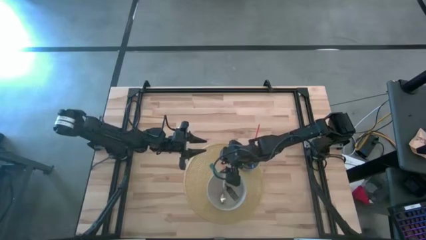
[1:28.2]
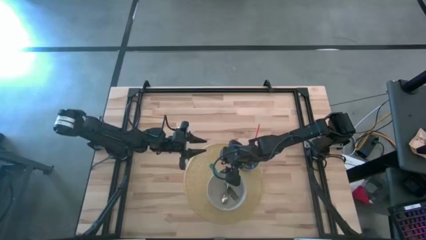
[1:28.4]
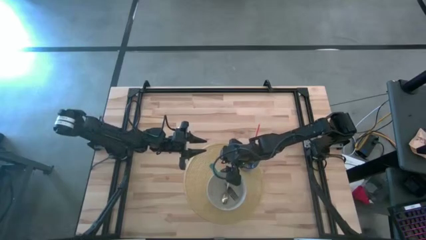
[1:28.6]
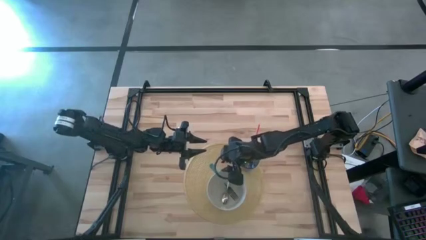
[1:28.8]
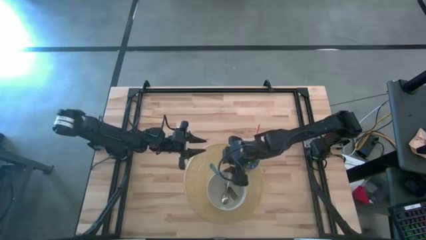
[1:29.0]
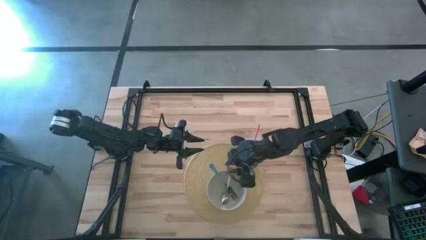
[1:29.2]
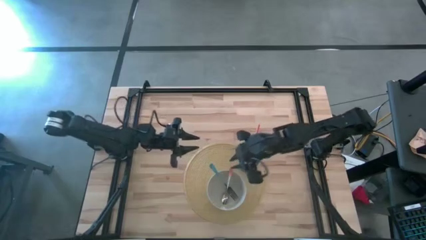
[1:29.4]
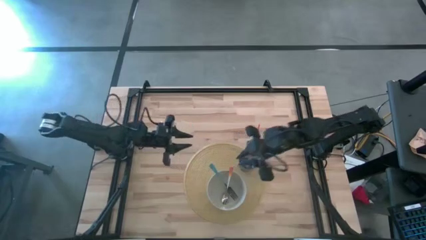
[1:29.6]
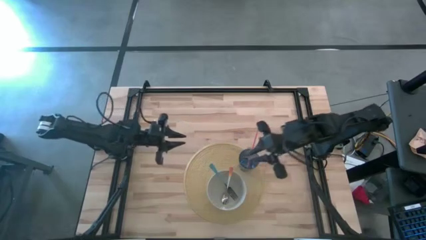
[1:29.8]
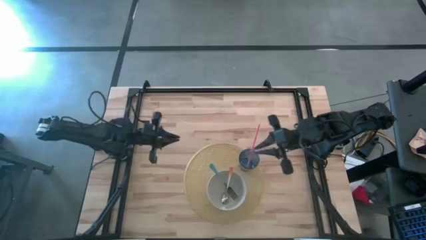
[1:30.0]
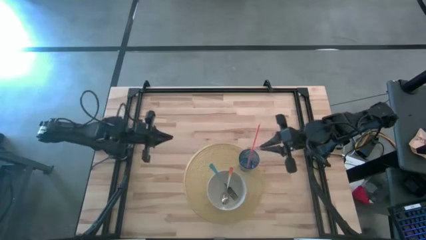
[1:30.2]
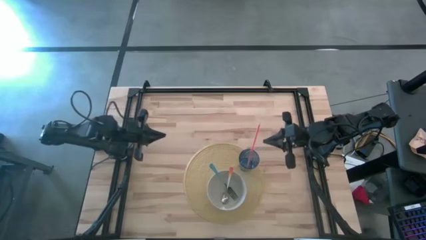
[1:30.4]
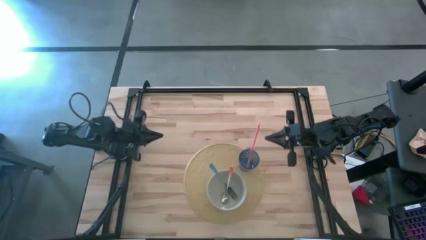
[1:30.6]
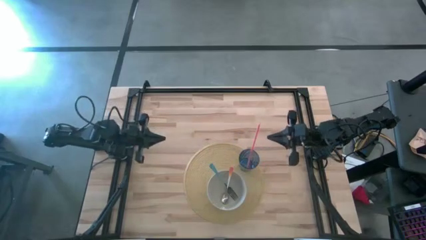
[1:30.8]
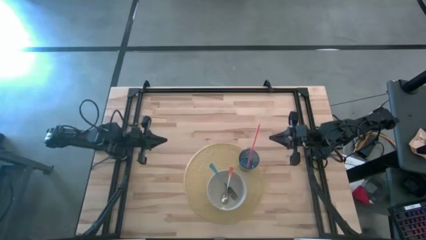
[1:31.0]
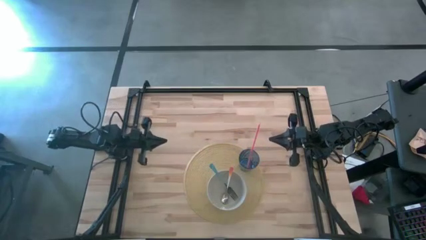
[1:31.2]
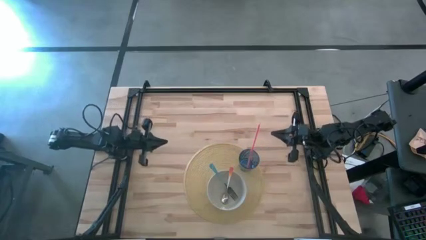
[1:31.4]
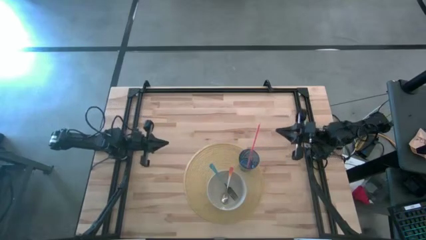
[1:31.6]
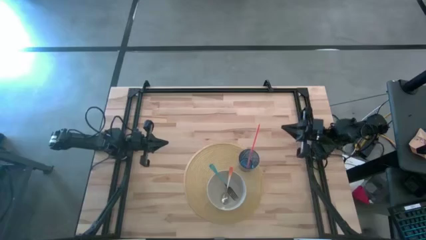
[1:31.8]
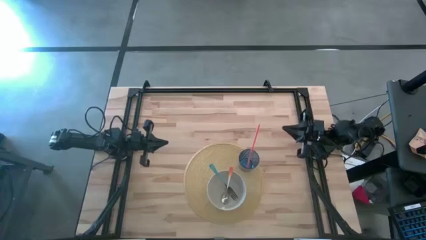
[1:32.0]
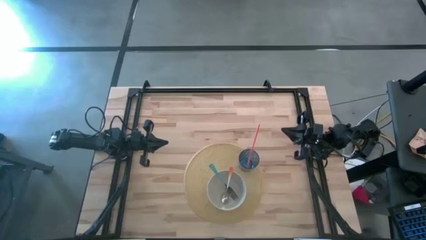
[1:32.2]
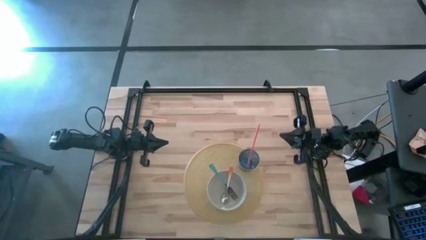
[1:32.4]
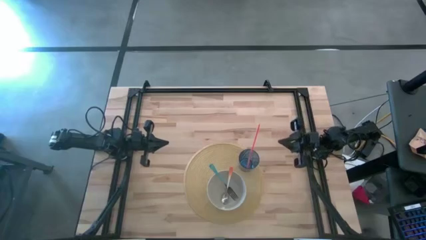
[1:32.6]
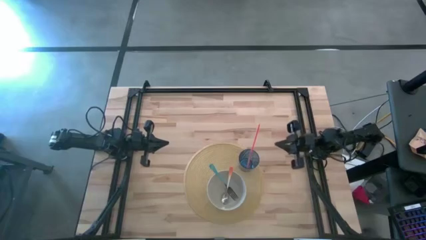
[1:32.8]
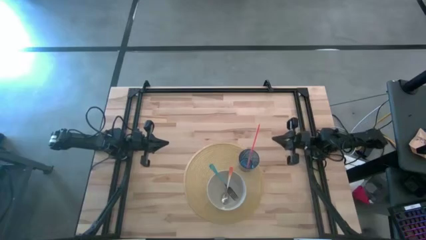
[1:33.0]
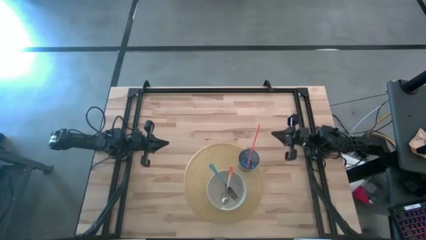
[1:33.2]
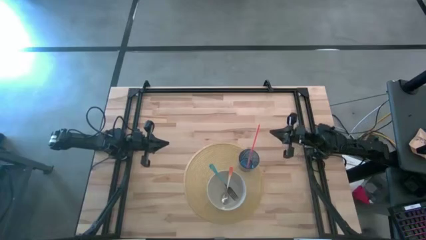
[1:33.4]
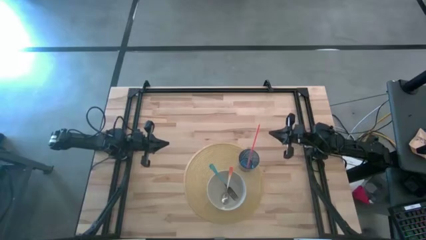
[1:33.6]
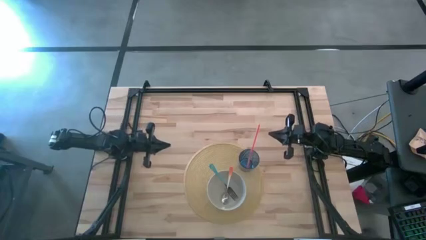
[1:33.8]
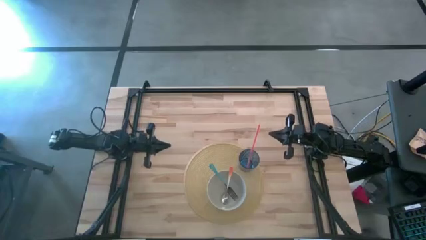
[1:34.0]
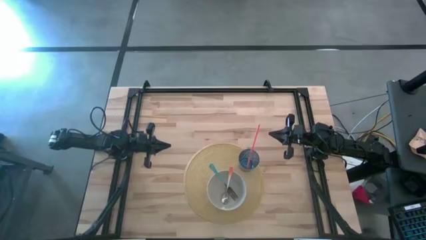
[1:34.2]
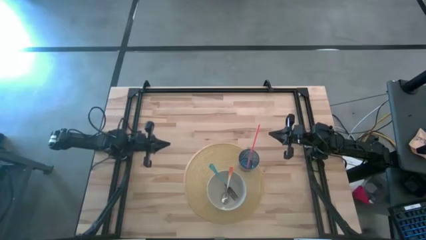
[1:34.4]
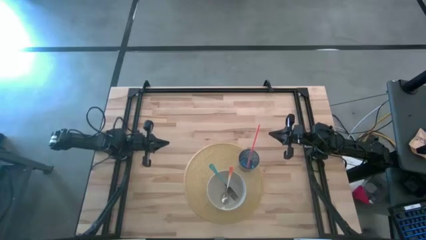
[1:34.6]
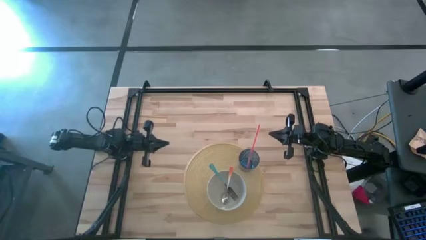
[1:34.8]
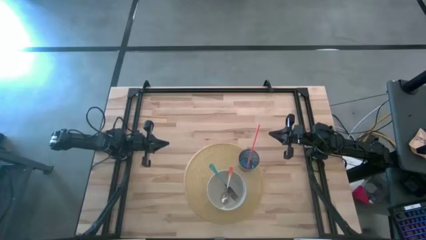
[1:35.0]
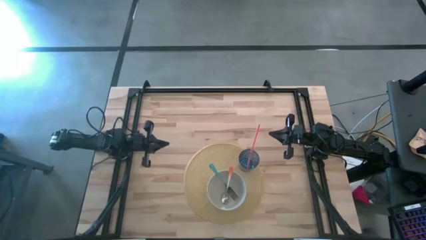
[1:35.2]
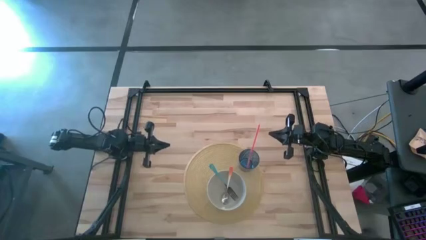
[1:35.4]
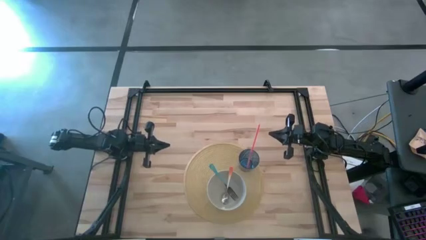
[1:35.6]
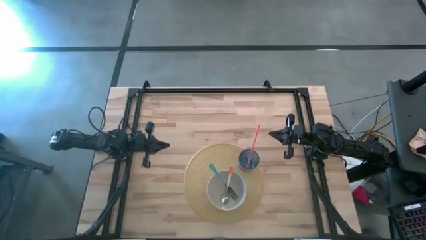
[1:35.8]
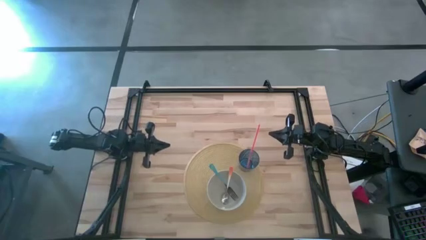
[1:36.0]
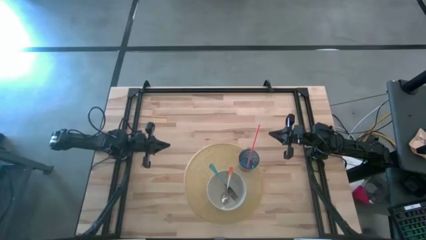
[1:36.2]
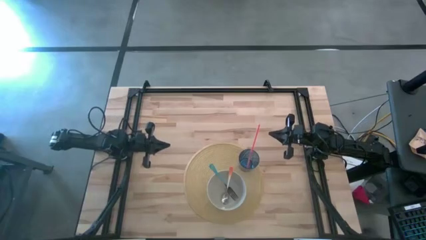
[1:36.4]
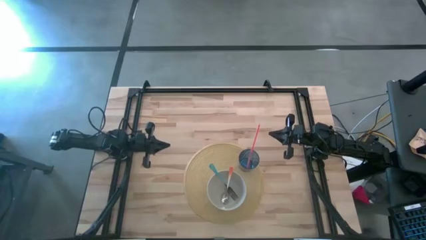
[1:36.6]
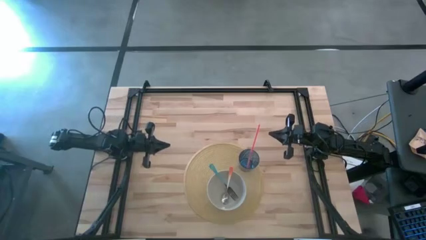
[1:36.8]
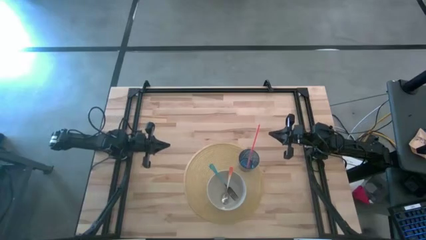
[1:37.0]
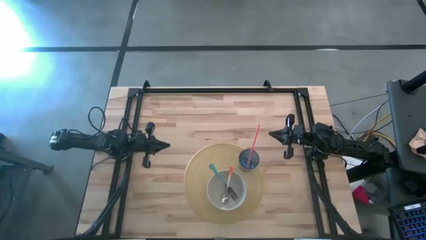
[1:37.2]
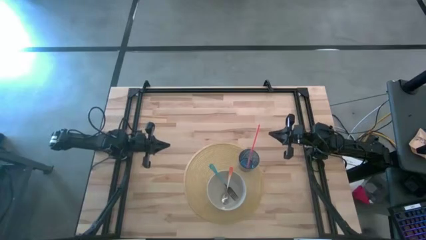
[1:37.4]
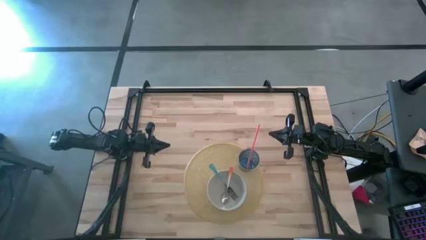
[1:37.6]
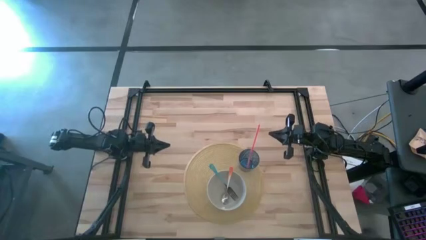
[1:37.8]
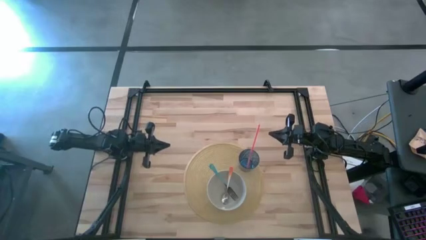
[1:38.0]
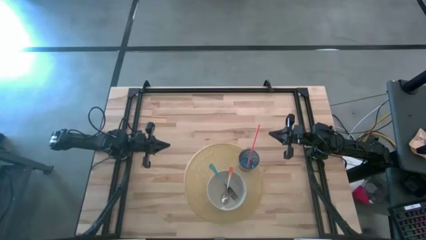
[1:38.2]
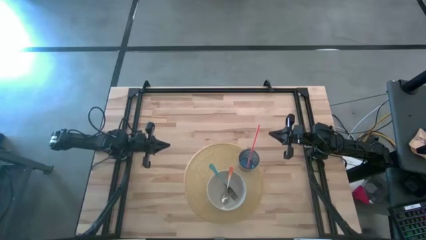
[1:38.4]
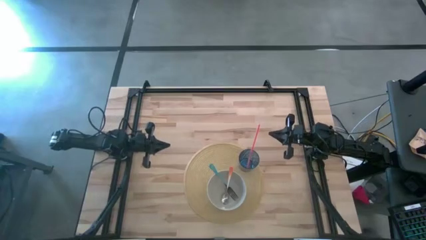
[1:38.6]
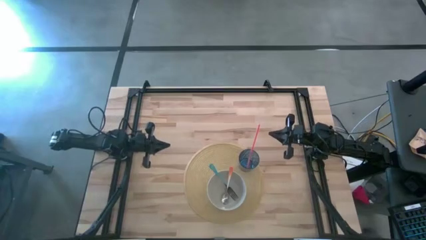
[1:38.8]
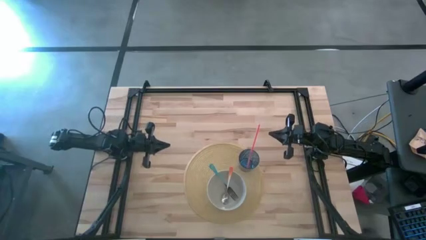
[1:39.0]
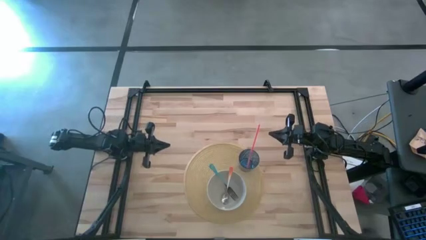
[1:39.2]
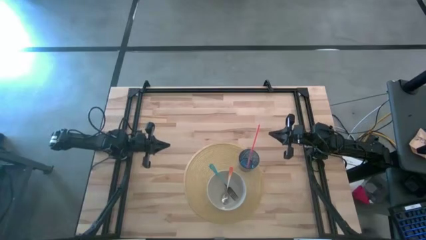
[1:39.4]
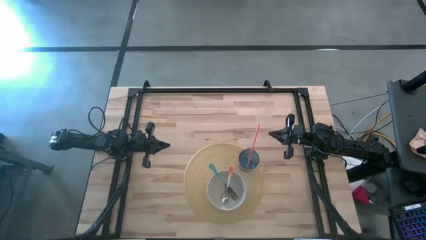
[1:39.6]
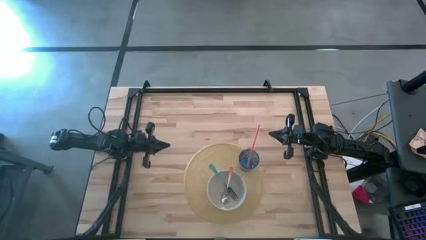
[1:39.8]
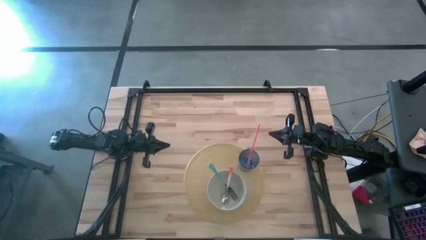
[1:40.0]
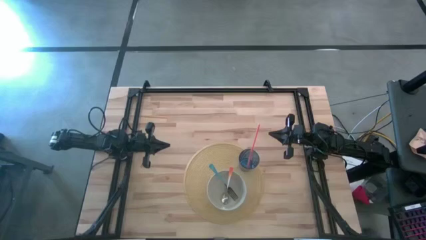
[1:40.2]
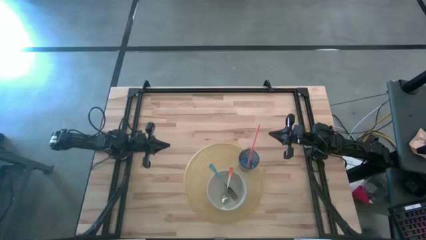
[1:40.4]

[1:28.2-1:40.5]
Task: Pick & Place Utensil
Return to Home Position
